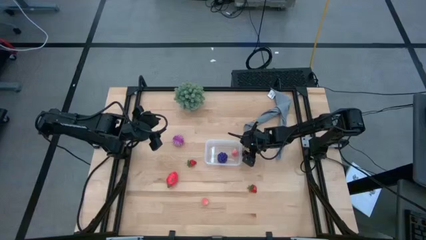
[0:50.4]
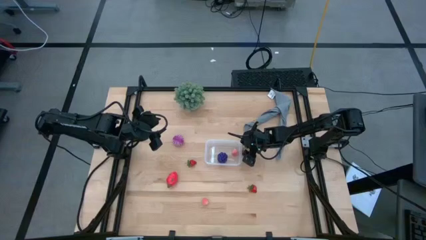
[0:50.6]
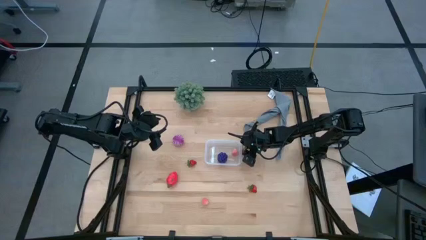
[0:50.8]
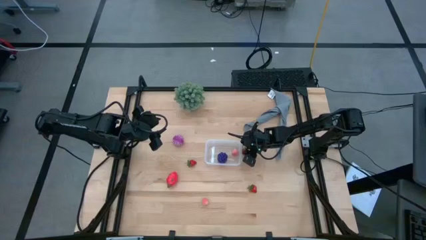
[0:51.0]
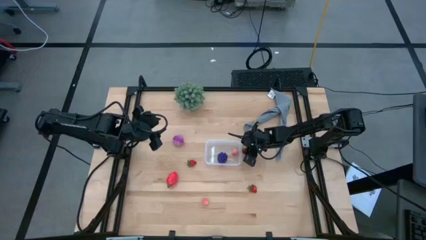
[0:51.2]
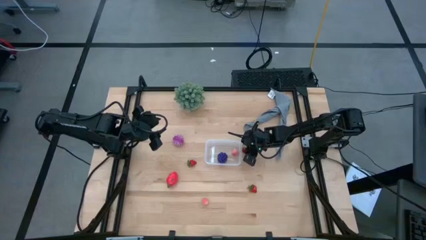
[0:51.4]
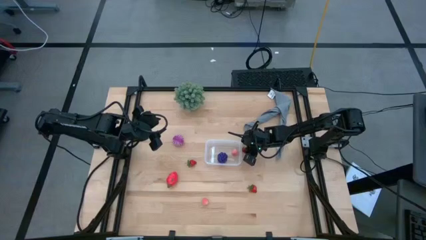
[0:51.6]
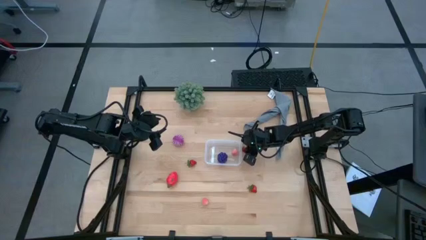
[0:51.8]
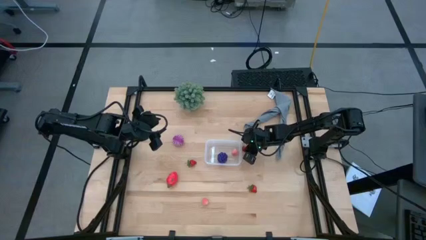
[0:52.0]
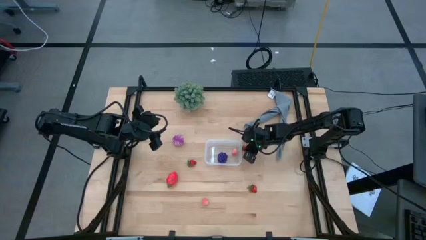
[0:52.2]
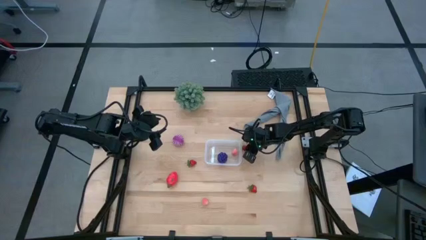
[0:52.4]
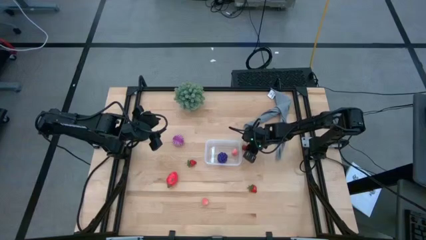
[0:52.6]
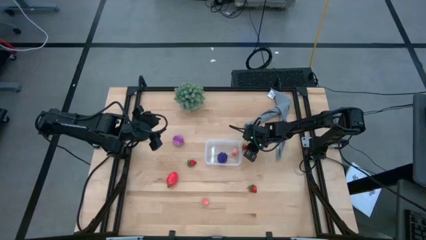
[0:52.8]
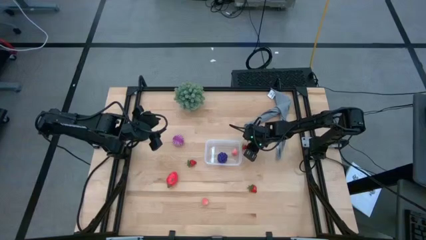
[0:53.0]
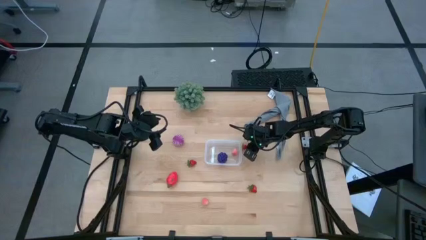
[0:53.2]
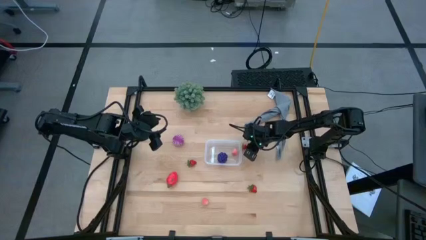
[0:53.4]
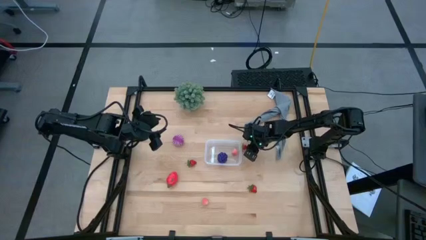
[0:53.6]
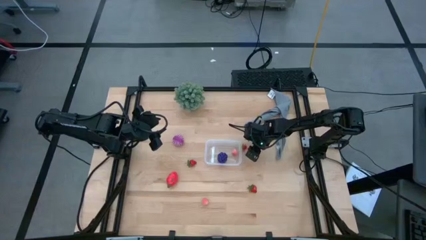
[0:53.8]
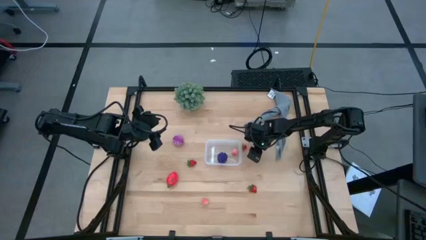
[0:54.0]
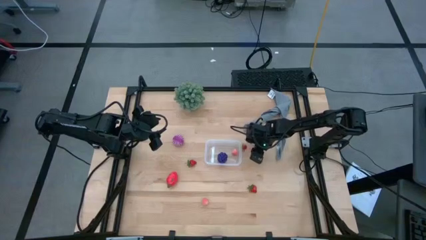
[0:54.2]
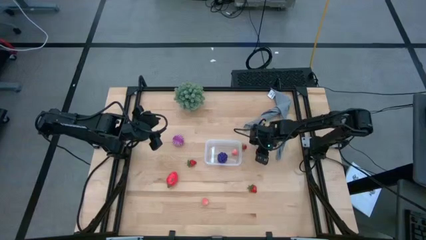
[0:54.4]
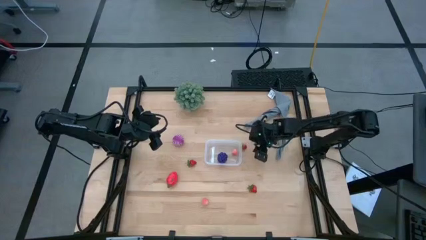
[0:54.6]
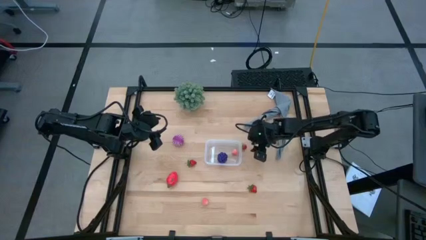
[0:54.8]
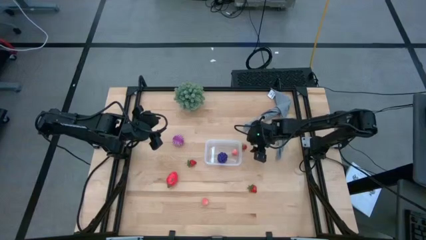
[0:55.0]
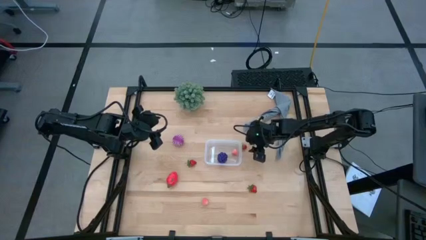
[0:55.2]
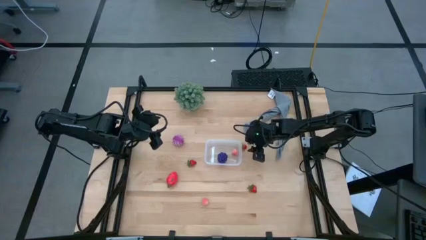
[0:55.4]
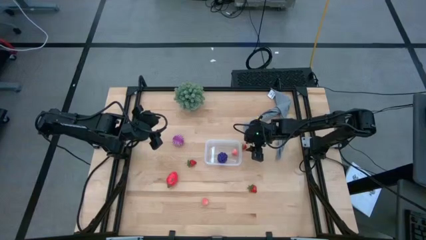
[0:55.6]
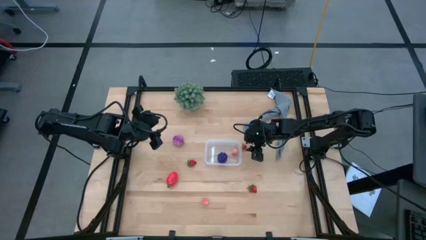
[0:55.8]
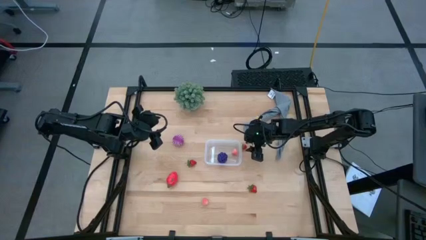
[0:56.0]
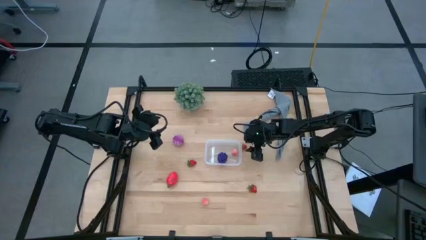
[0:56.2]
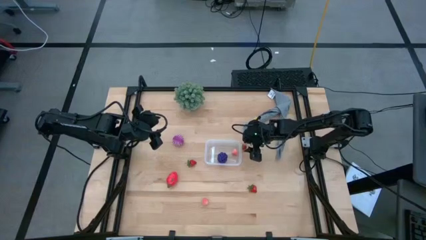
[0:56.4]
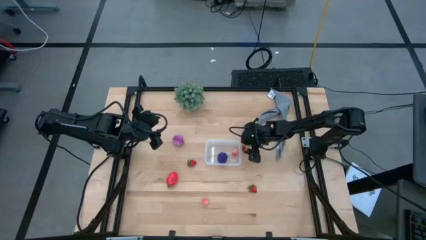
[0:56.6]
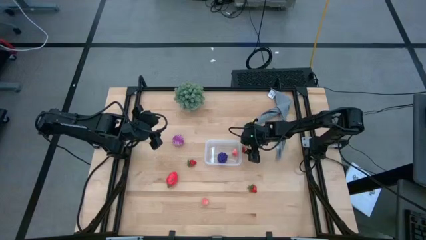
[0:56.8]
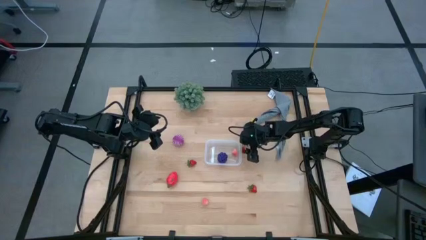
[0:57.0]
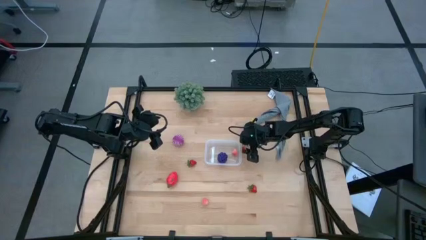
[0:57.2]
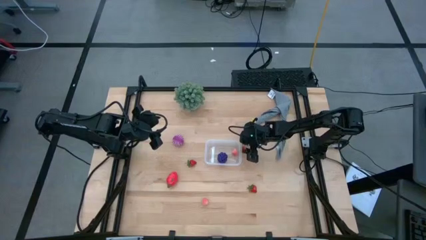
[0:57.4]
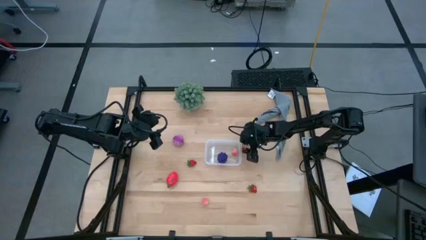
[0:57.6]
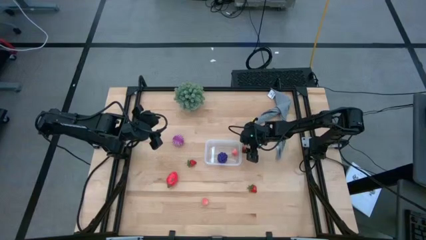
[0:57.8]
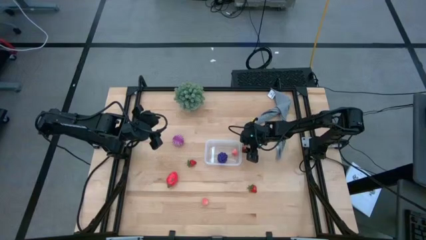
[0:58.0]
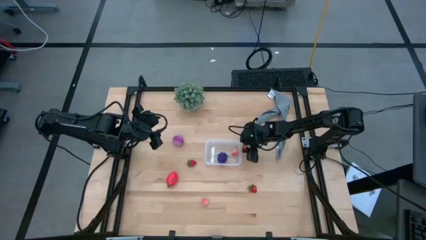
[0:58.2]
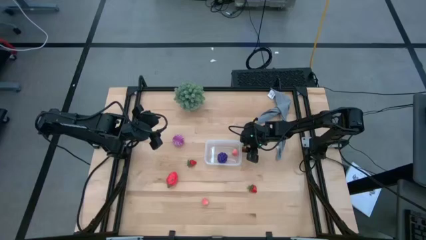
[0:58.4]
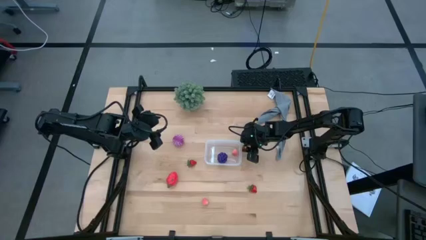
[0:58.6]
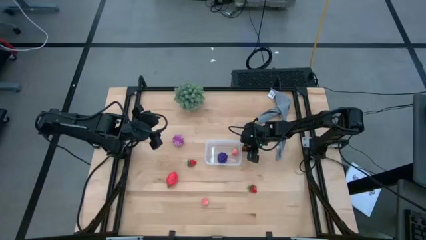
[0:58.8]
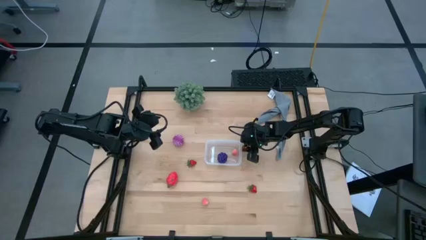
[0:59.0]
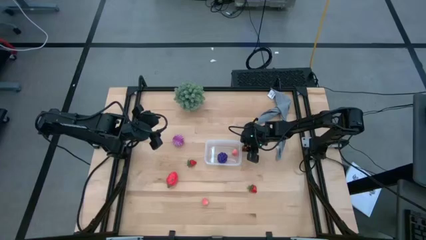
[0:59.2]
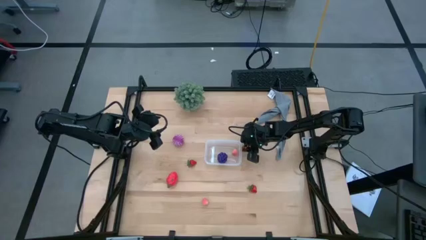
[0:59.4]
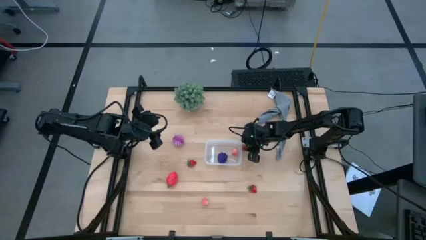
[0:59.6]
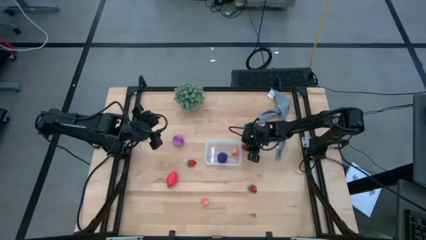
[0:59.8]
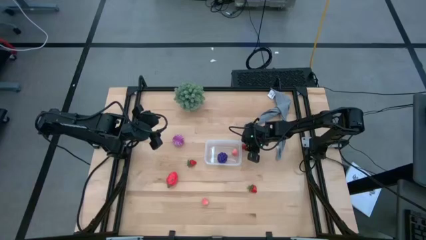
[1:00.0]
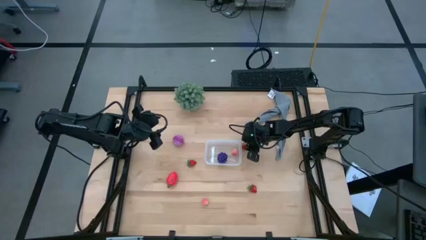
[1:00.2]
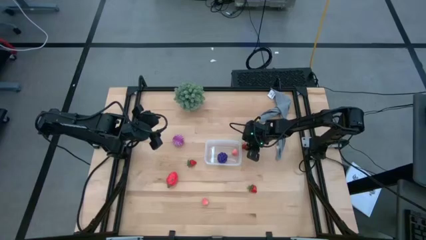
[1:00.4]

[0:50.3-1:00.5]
Task: Pick and placing Produce into tupperware
Put the top right strawberry into the transparent container

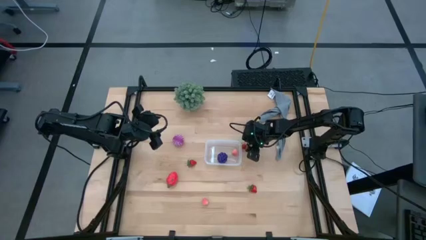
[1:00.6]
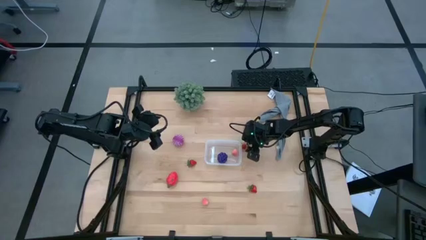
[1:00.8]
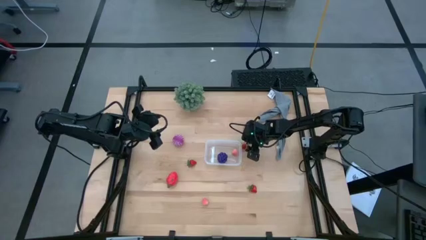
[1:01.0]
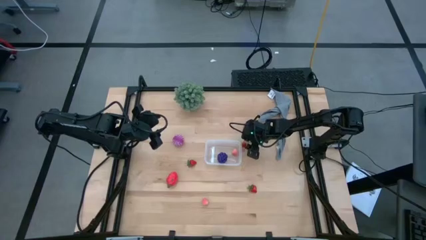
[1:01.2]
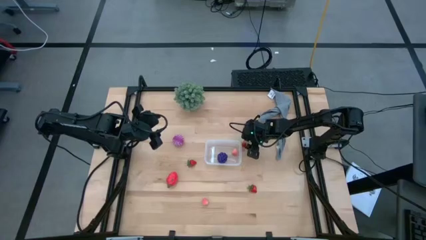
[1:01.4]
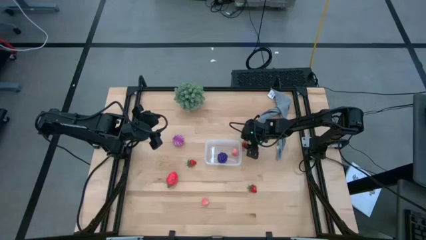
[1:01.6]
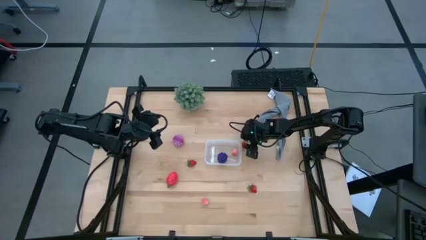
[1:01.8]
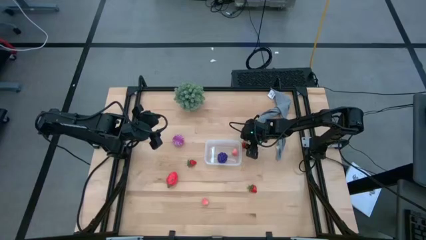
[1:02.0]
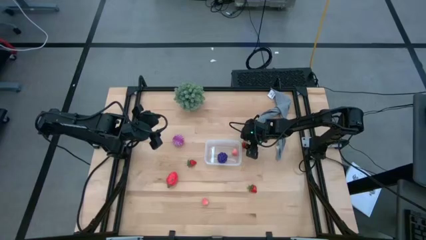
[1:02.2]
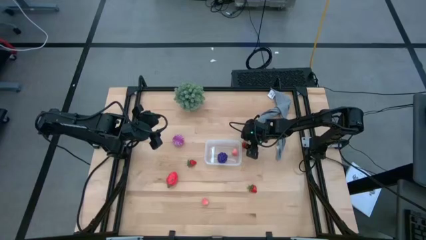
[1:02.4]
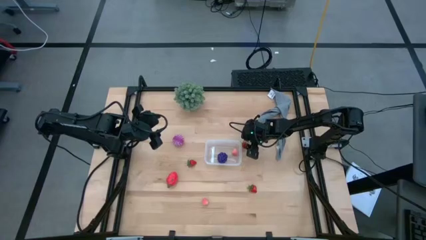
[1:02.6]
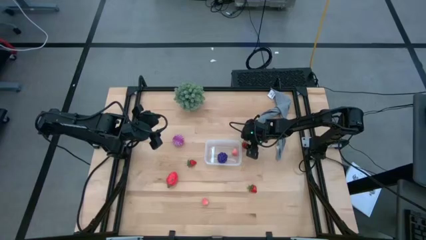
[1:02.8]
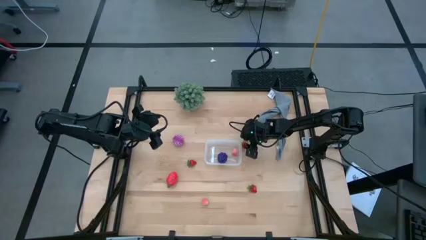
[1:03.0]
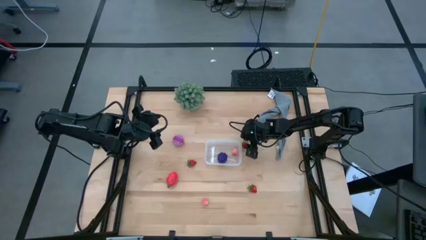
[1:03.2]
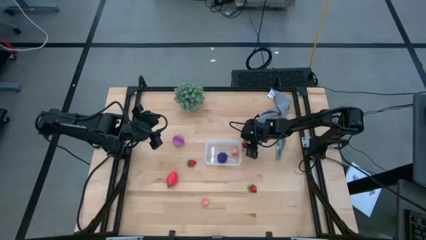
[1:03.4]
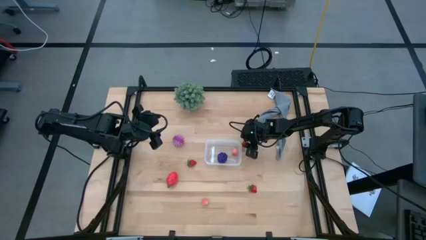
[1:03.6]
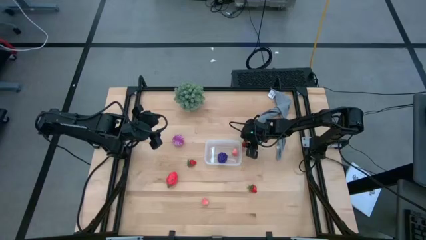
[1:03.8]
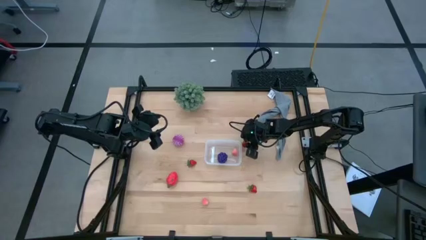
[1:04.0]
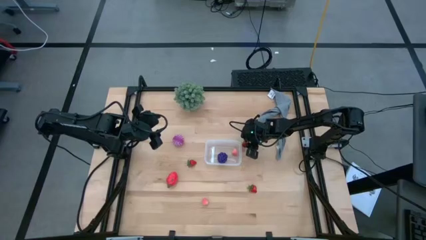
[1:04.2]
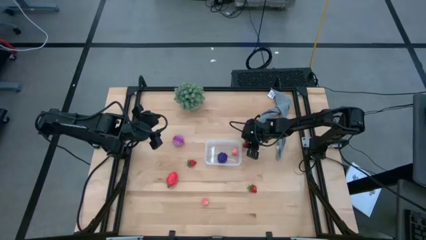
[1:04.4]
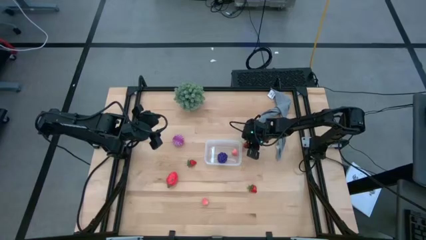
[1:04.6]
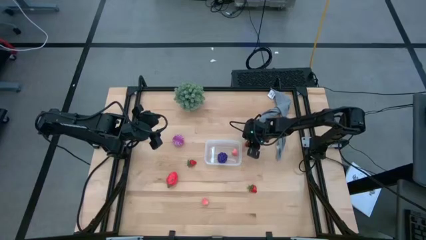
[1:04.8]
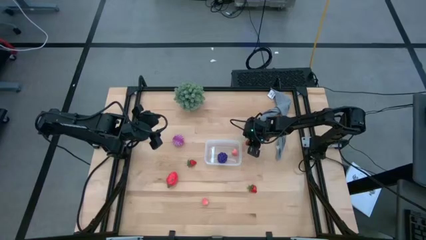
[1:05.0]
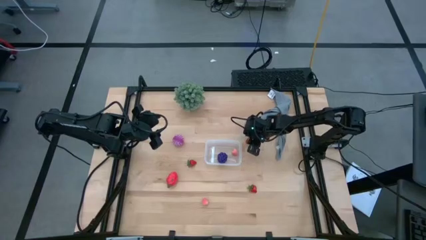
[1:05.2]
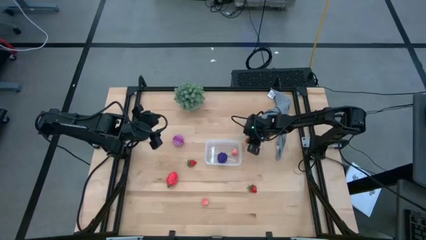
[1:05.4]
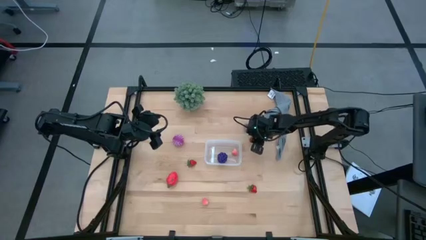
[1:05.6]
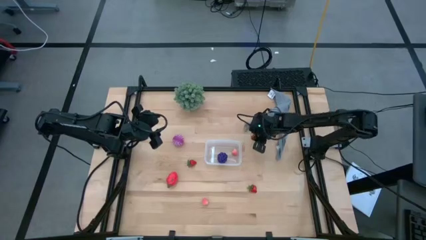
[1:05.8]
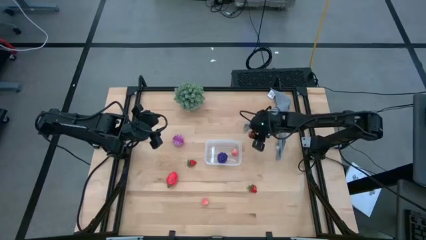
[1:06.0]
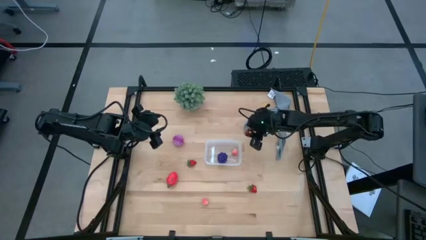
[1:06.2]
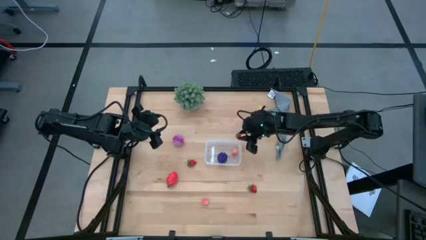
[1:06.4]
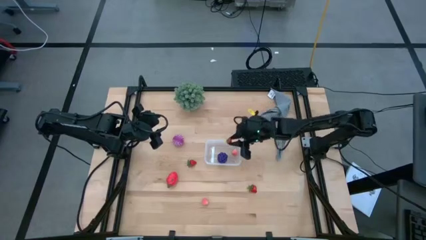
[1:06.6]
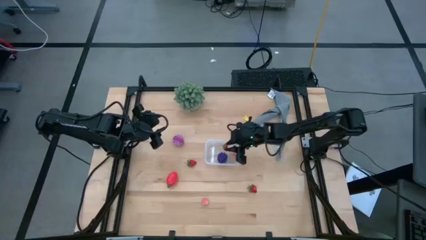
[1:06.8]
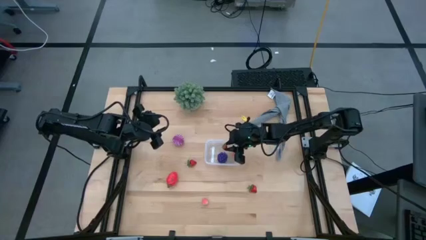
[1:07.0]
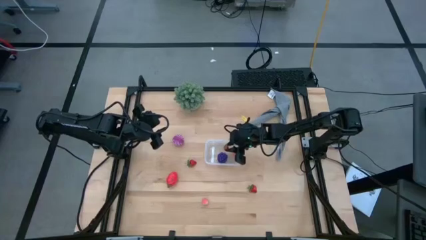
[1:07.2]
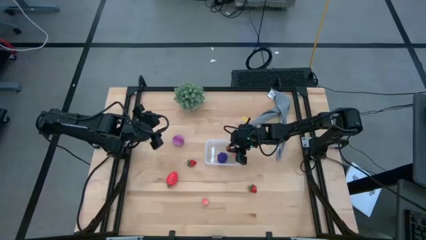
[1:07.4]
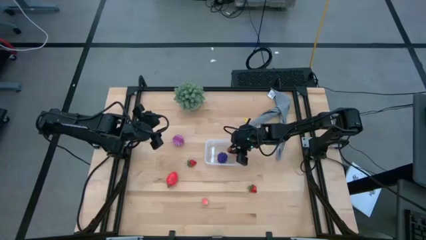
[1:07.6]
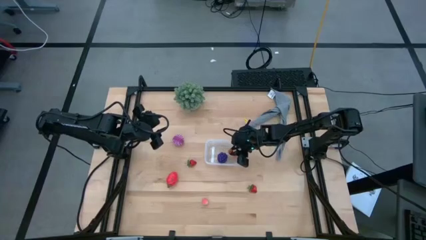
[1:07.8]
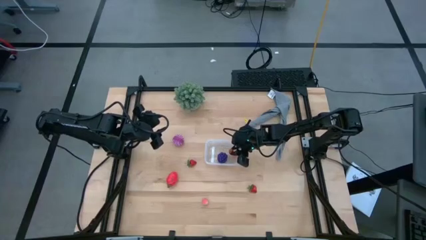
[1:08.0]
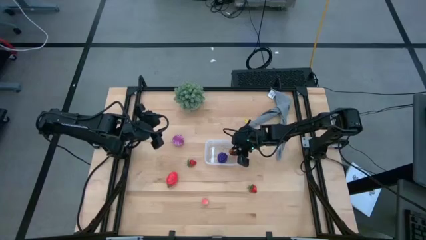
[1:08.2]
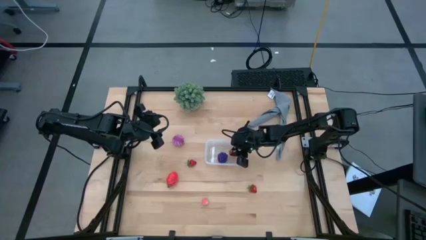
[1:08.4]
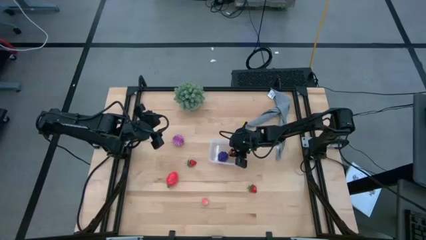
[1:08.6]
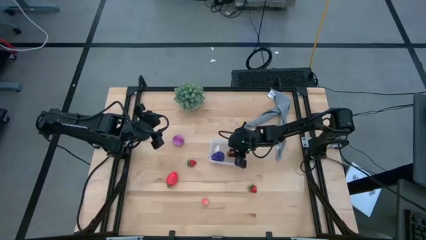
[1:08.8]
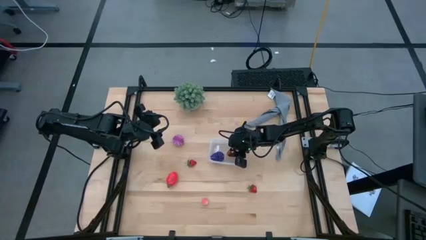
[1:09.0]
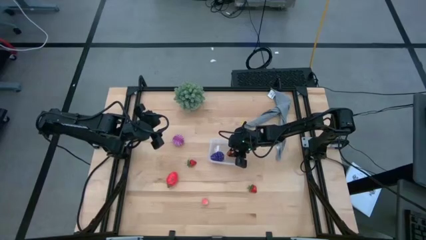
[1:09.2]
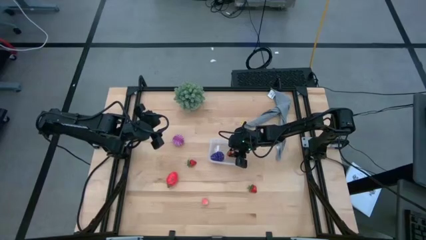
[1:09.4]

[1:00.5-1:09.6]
Put the top right strawberry into the transparent container
